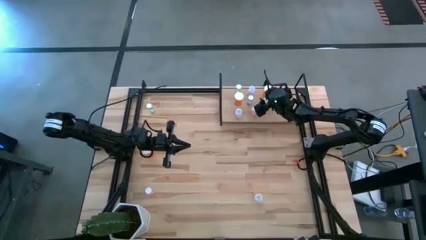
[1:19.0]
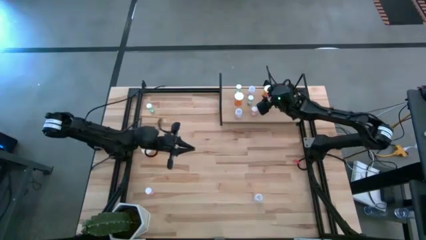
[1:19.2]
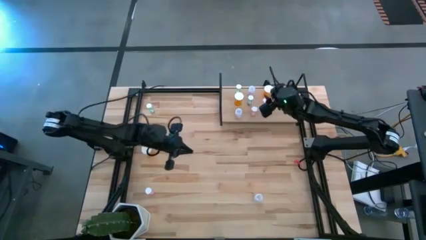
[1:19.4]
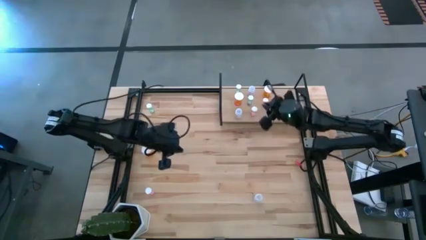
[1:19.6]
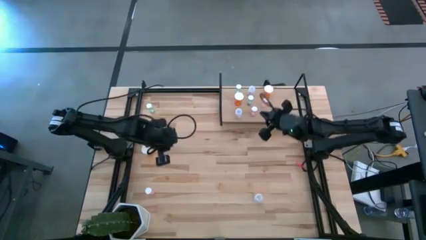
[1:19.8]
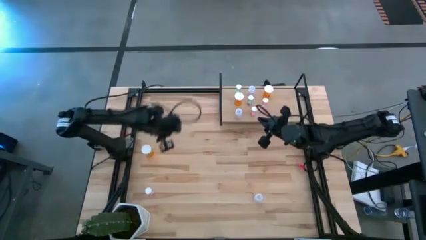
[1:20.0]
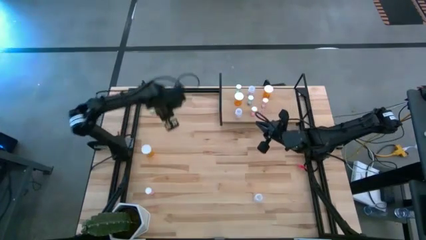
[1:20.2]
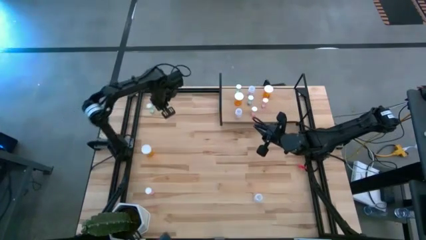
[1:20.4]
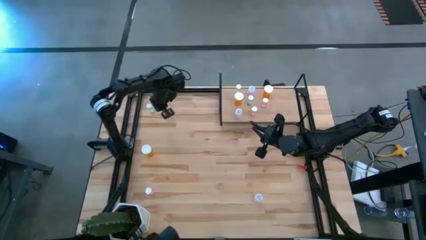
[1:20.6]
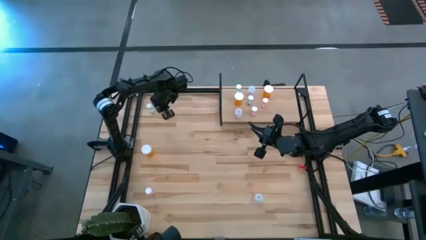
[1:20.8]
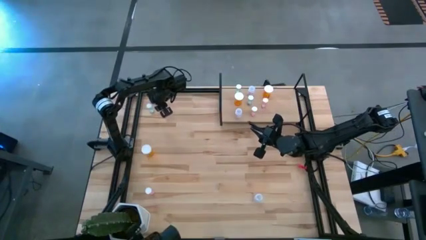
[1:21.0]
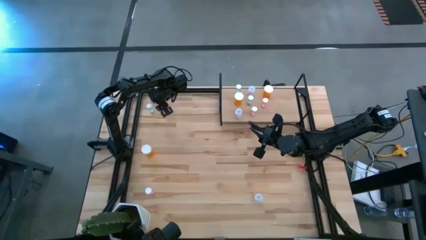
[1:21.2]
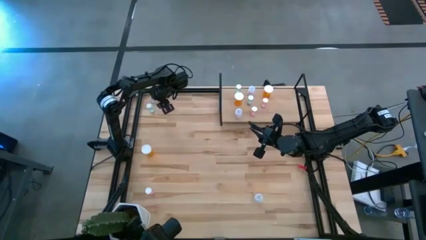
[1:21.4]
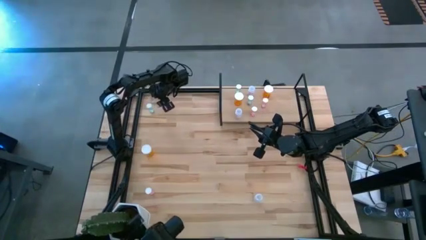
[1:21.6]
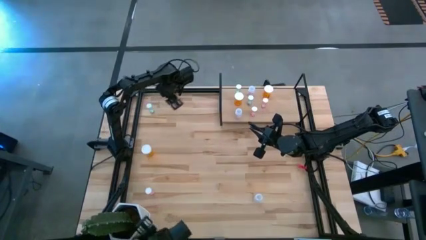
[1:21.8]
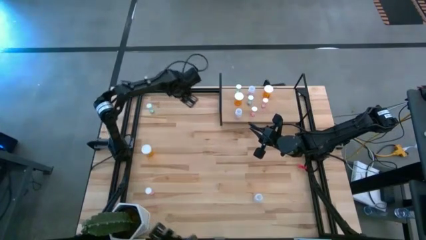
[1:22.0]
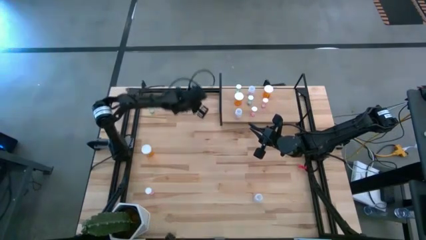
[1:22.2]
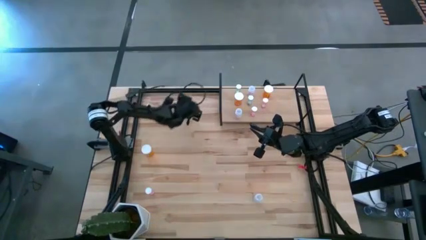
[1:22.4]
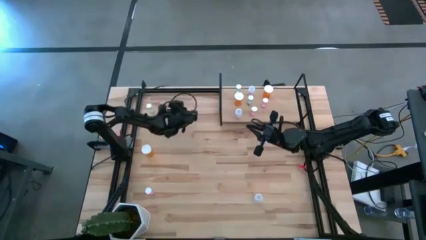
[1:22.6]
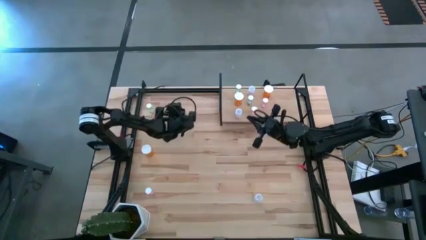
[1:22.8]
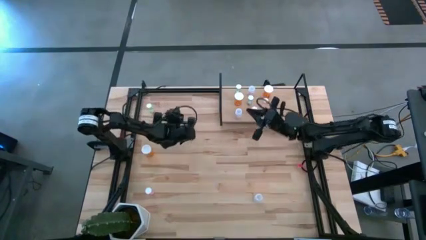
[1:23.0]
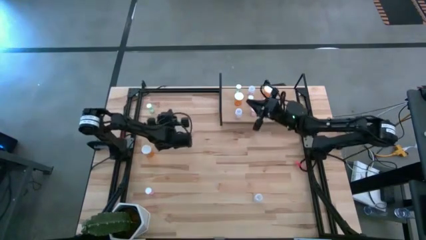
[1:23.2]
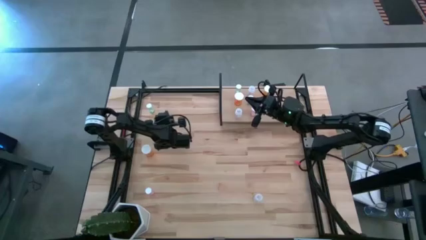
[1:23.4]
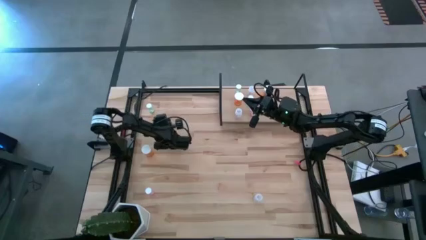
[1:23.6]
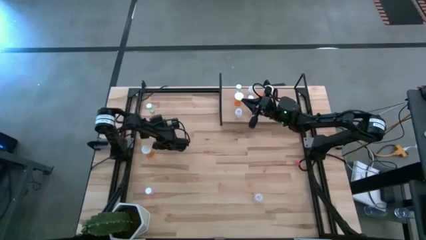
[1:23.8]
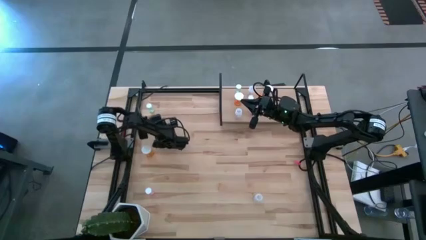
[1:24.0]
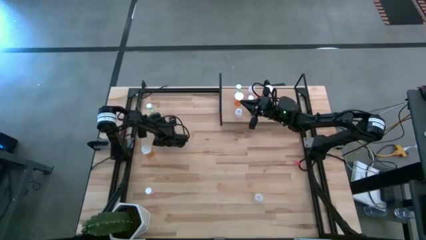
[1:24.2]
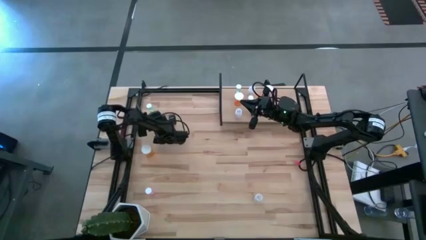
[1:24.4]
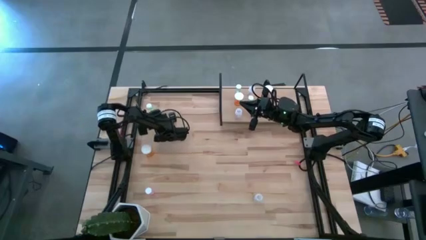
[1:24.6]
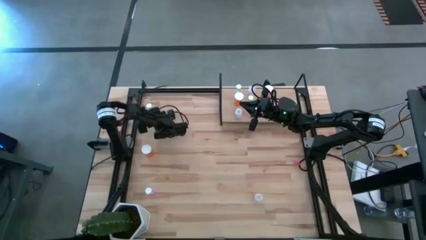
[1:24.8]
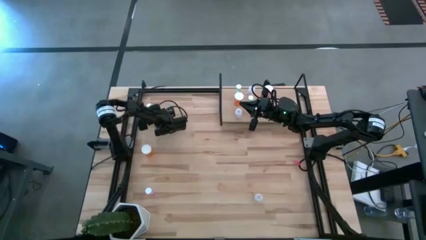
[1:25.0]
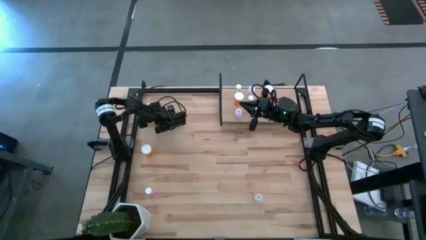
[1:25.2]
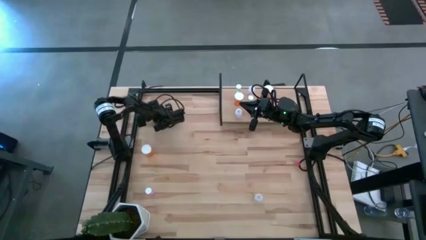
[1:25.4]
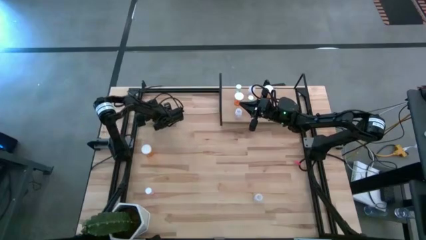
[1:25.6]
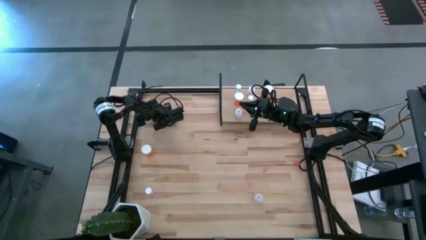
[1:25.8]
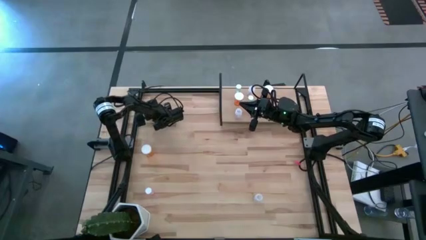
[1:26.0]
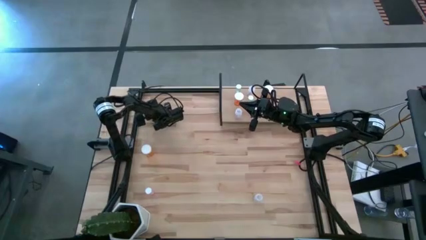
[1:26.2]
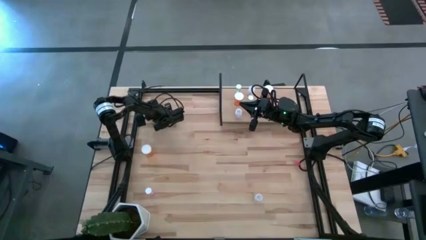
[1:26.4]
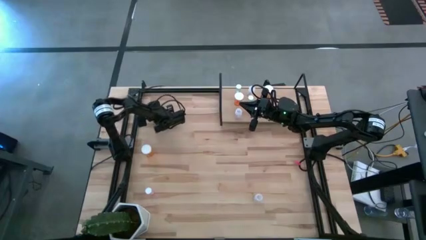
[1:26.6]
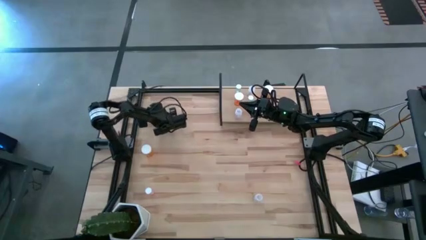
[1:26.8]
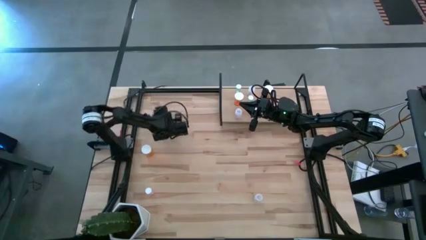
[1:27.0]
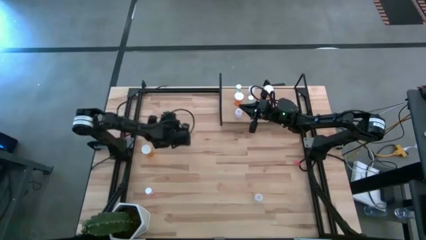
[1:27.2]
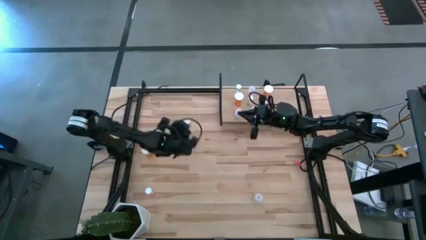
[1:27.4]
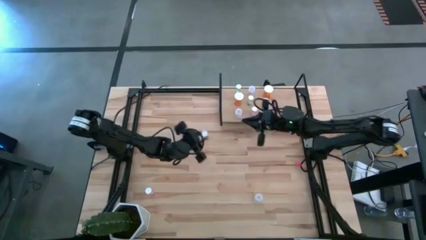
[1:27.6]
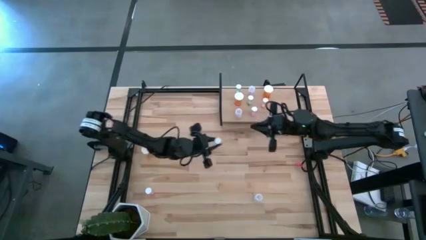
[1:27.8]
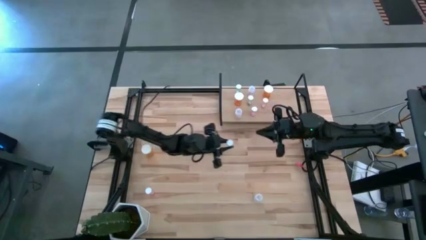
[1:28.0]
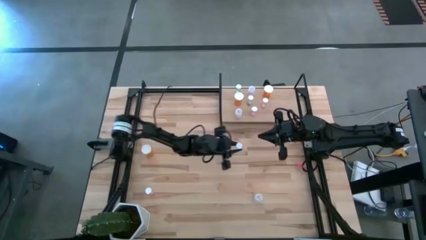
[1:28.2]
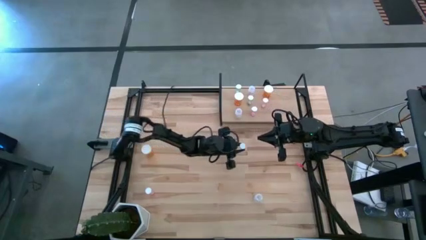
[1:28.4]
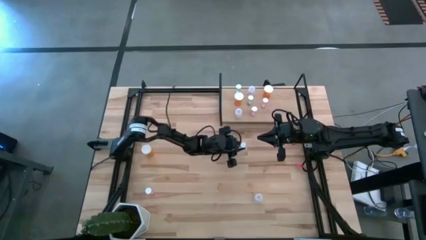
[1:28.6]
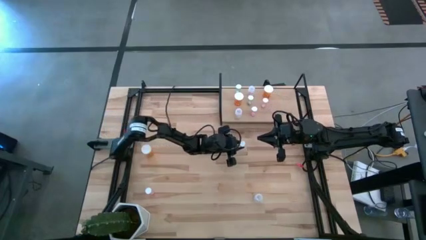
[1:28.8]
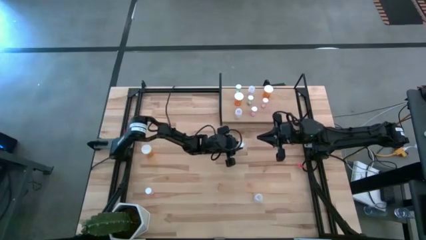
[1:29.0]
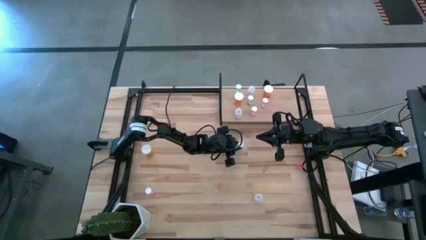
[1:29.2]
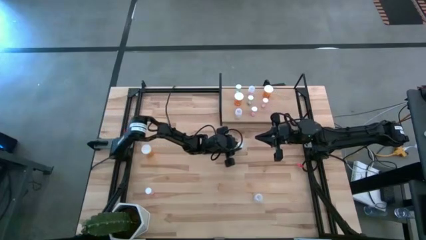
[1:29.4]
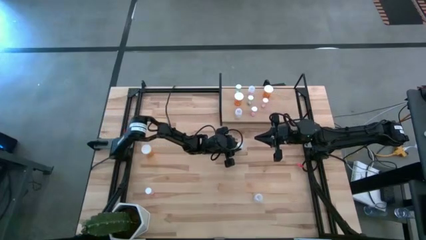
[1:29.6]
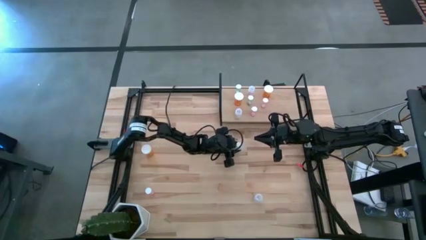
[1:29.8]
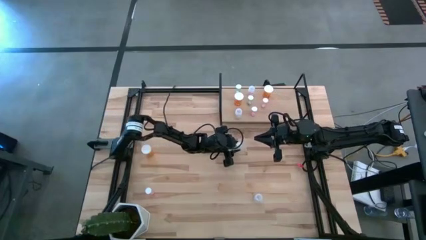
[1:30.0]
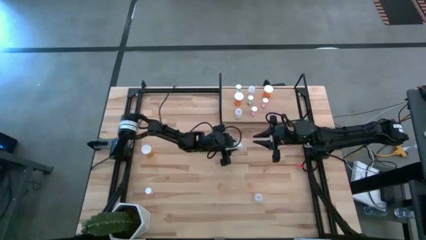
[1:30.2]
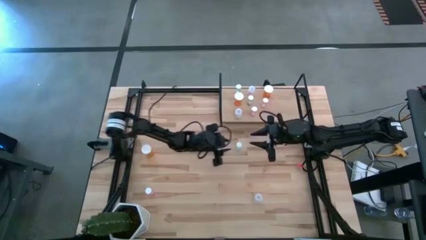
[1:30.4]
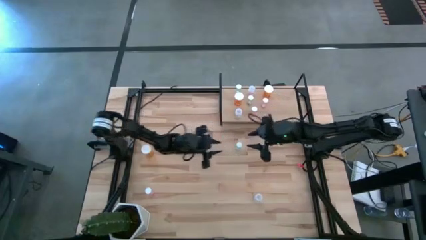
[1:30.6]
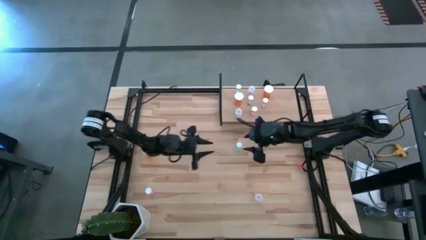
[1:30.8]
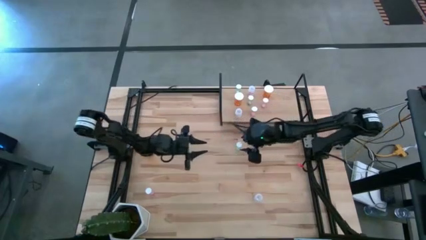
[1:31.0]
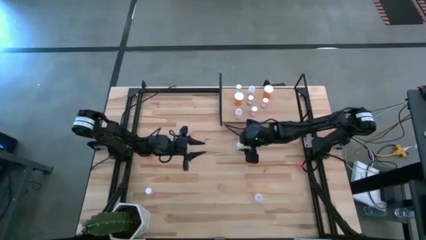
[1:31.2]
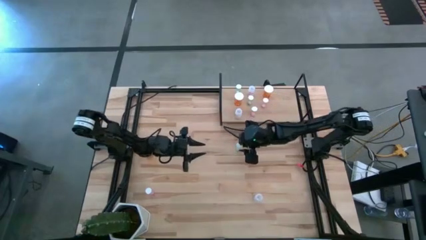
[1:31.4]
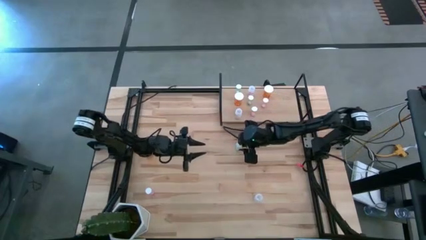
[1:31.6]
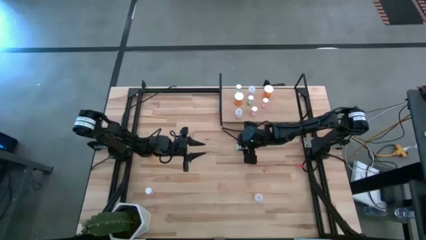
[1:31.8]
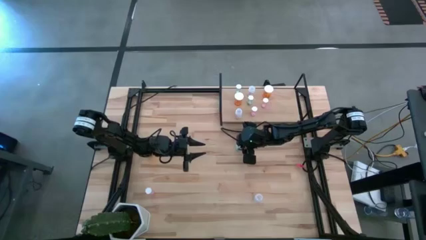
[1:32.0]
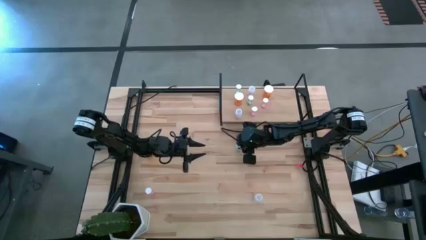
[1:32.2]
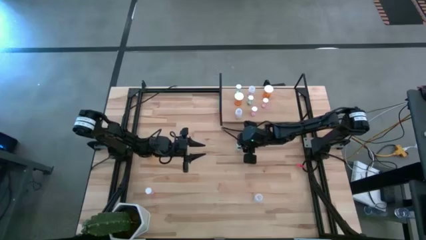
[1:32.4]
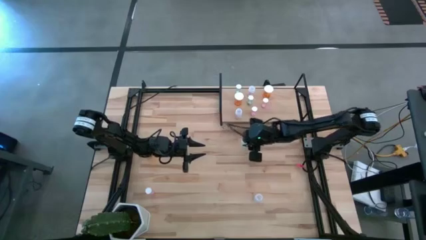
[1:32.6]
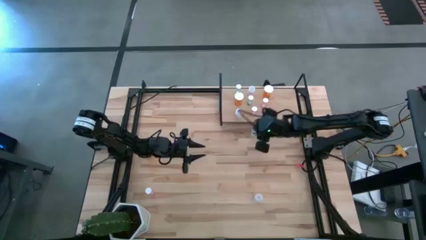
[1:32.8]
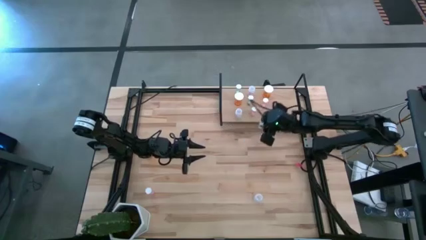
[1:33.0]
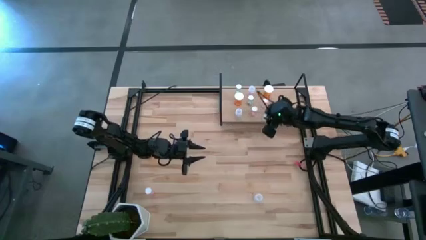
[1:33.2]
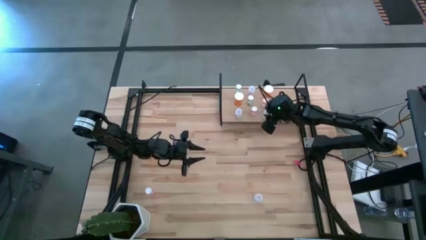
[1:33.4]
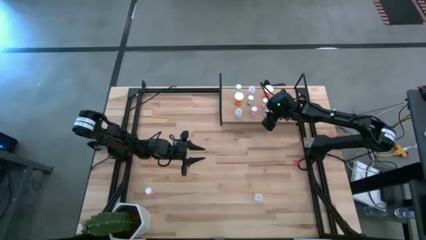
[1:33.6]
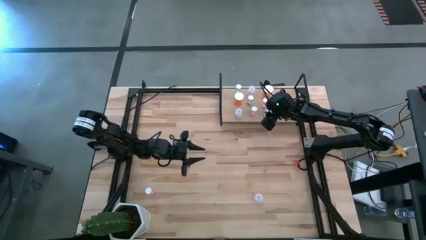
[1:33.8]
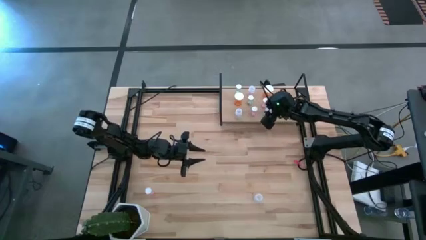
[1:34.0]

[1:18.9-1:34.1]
Task: Pick and place medicine bottles onto shelf by color
Put the blue pill bottle on the shelf

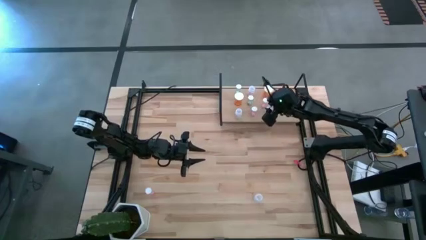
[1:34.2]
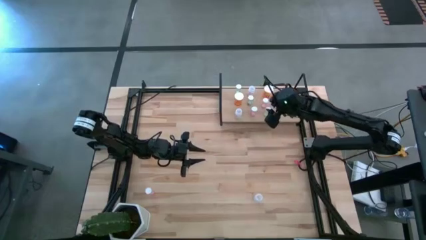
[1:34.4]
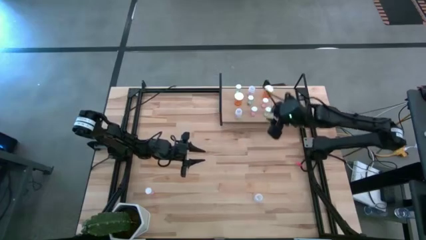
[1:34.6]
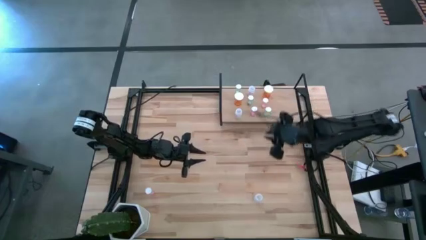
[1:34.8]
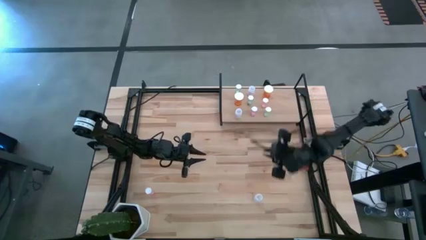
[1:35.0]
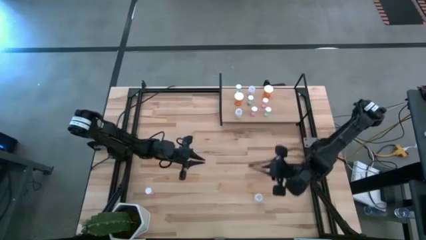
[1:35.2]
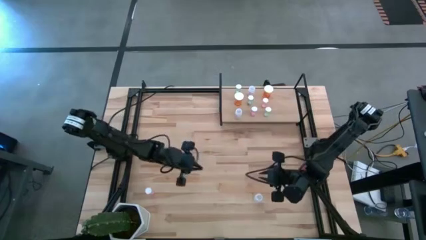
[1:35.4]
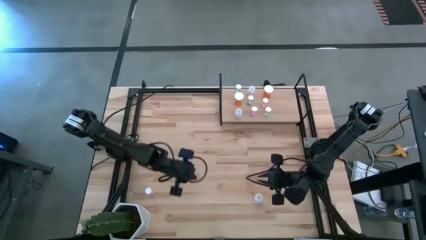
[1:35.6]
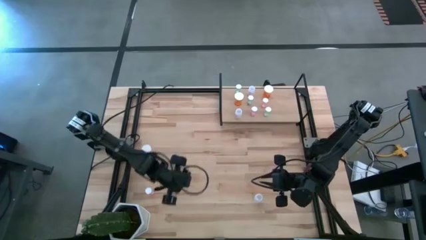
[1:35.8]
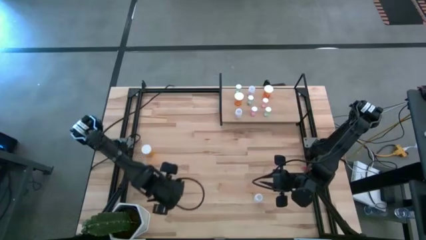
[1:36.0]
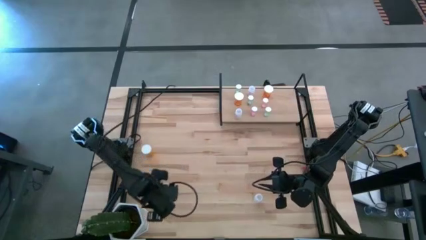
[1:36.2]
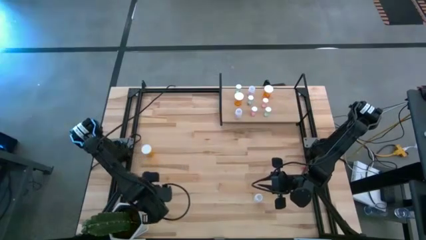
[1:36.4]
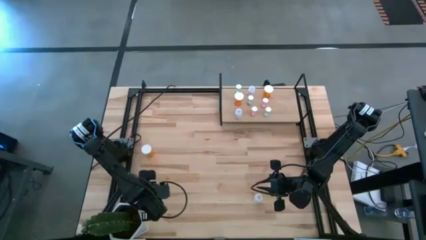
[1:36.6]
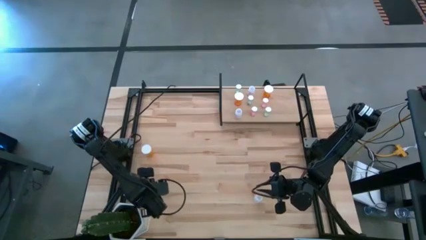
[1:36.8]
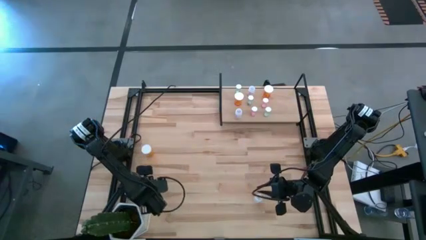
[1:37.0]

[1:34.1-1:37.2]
Put the pink pill bottle on the shelf
